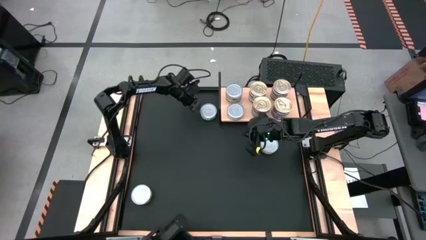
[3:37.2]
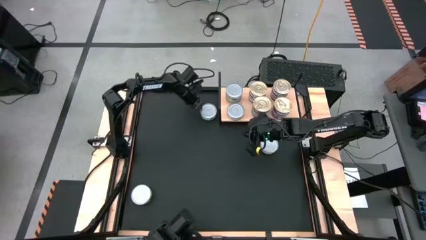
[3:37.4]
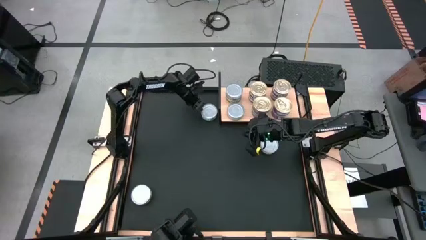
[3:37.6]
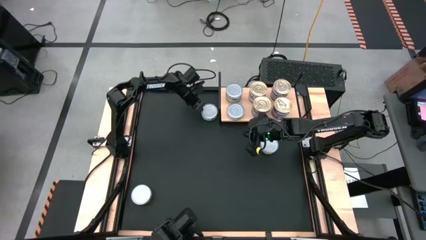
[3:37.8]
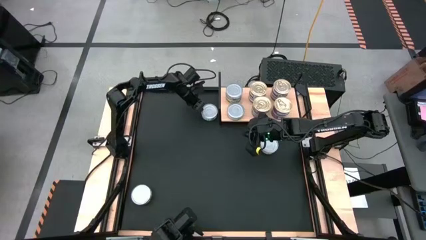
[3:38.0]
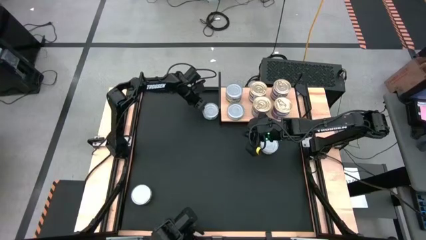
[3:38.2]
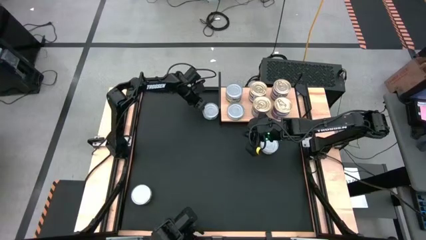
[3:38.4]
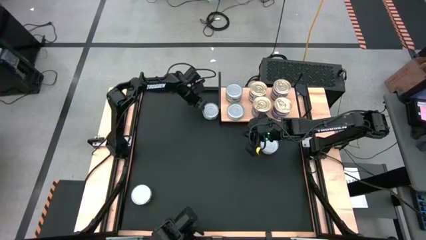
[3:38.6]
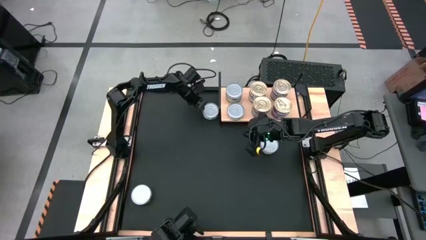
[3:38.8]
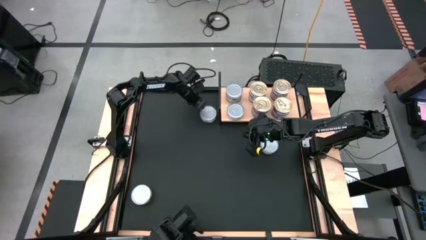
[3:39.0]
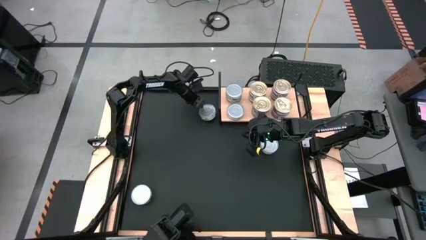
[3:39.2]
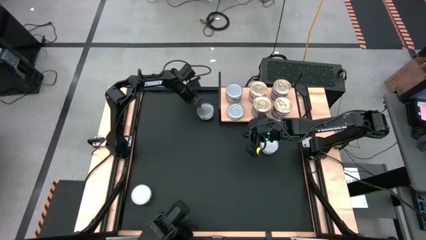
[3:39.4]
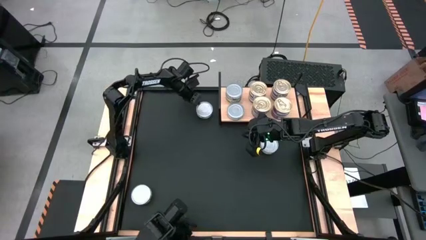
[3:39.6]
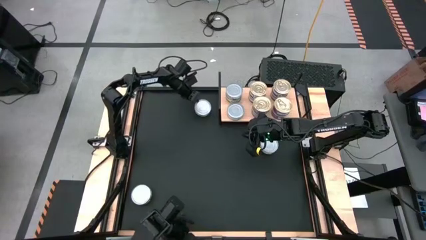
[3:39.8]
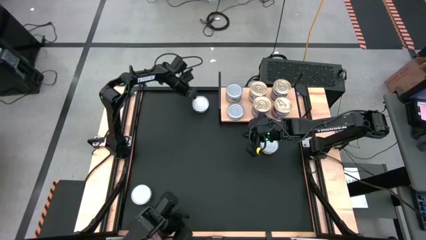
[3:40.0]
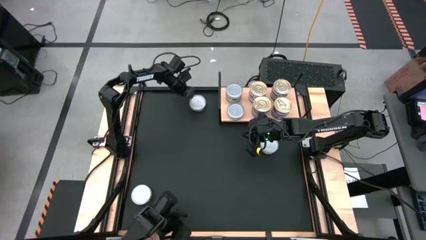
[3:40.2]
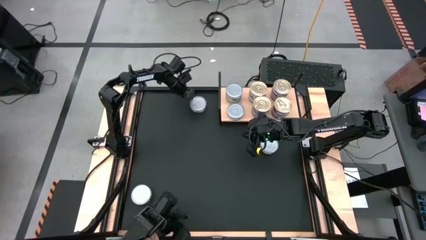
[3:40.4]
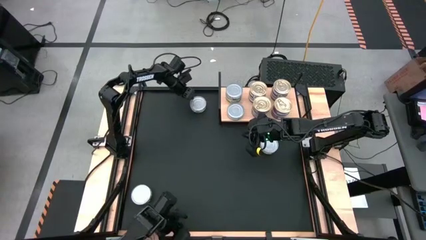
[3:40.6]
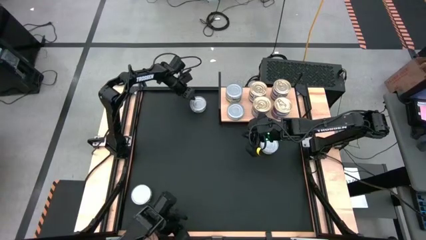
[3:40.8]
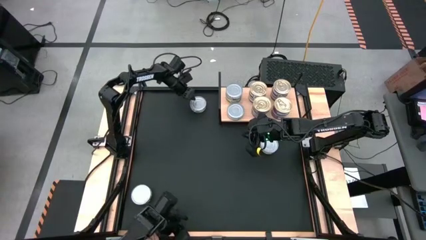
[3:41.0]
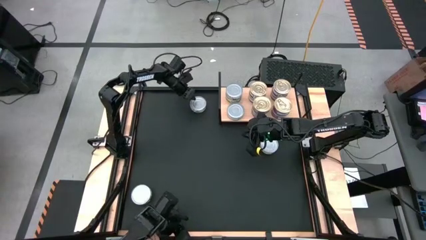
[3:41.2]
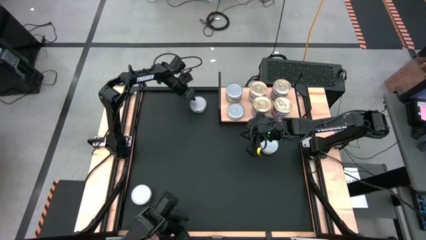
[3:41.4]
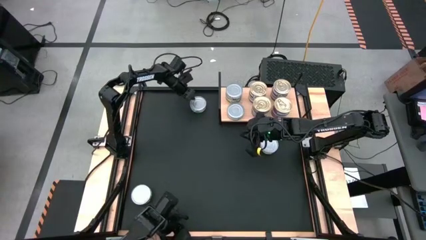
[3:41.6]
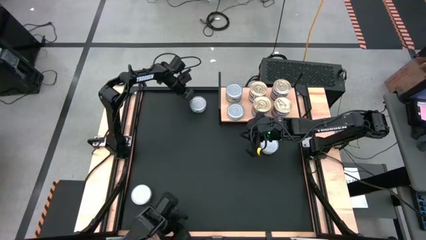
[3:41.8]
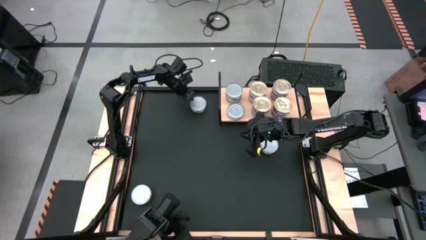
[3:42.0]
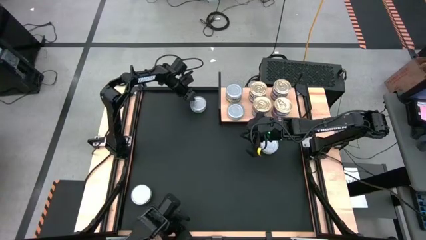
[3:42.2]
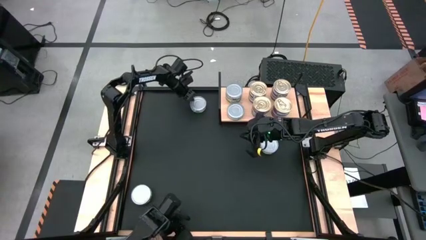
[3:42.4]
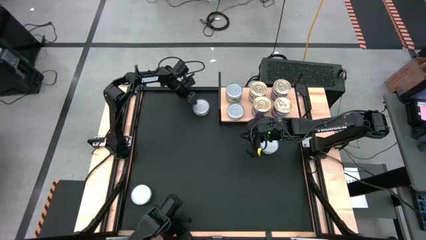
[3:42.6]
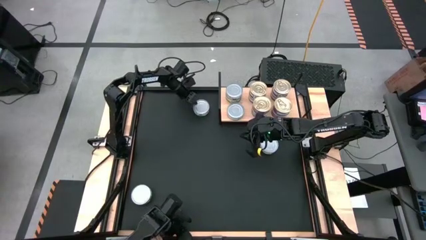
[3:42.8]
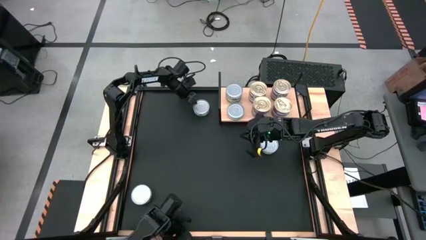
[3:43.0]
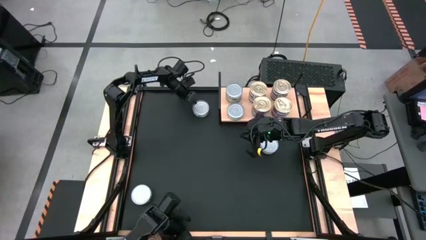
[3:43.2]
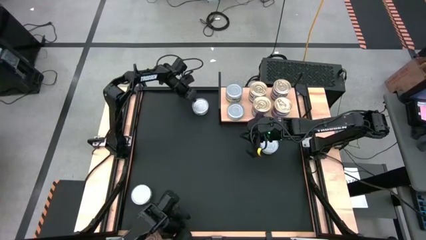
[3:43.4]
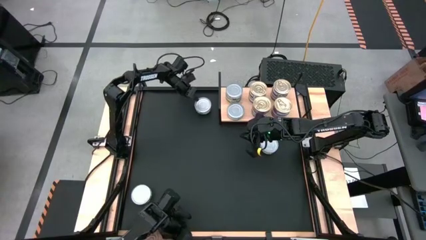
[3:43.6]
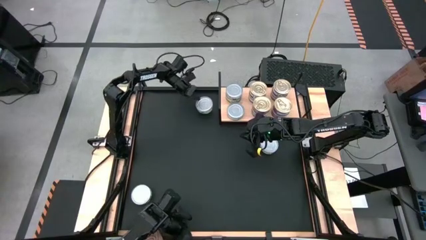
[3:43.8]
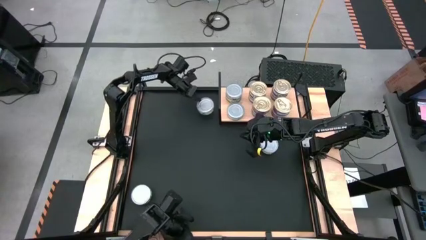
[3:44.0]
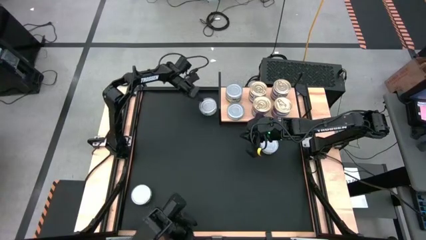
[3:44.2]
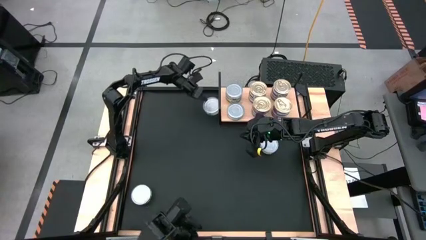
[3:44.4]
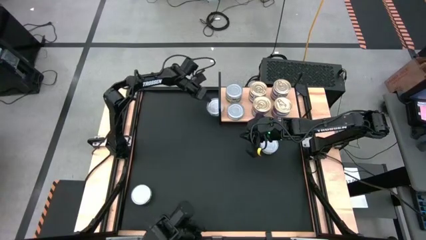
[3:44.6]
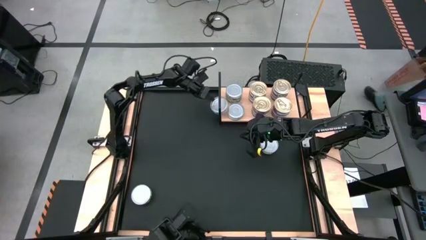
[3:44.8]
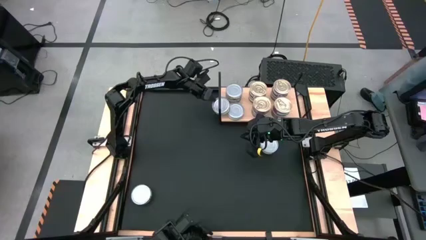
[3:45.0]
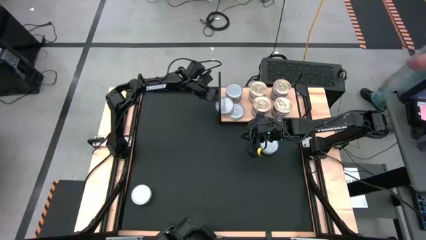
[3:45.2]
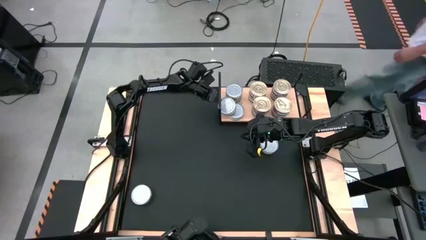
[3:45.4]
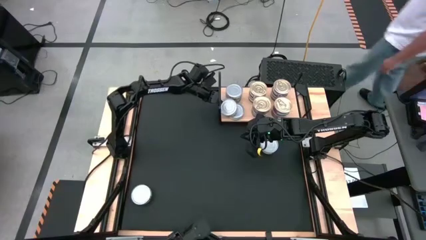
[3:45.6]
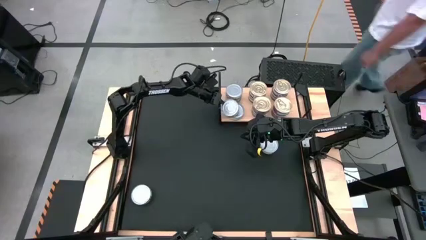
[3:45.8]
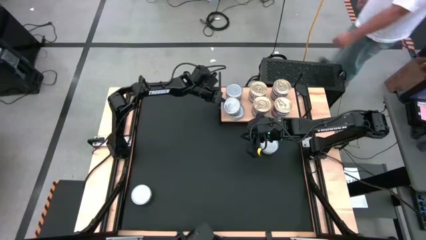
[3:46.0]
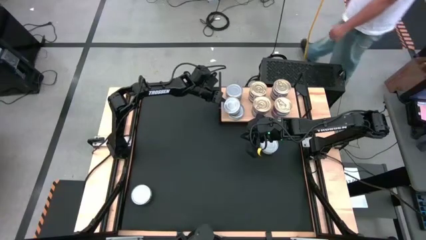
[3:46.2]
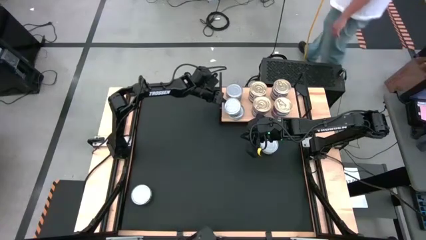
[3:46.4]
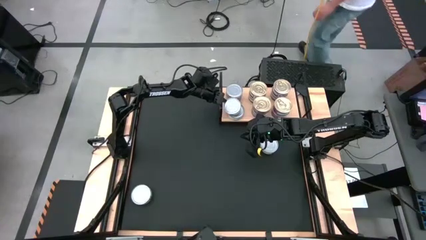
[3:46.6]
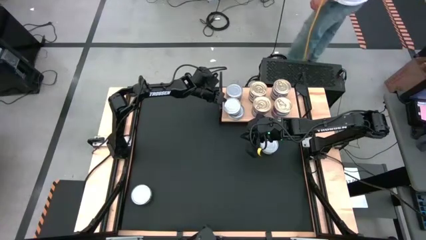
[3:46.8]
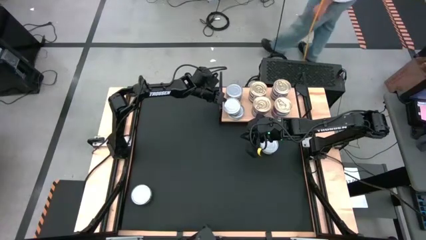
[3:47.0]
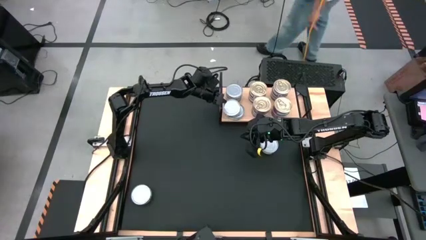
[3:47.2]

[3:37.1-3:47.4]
Task: Stack canned seafood by type on shelf
Stack the green tuna can on top of the other green tuna can on the shelf

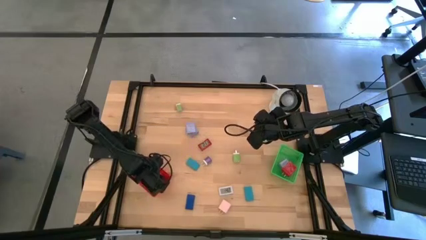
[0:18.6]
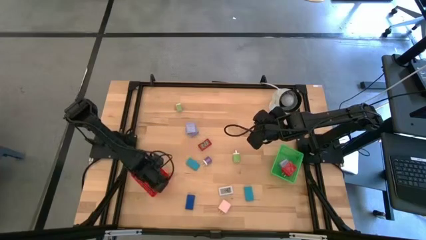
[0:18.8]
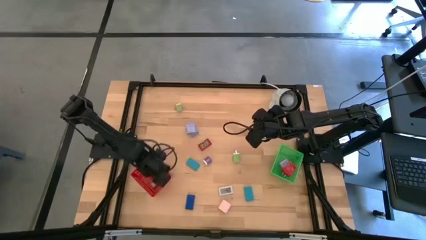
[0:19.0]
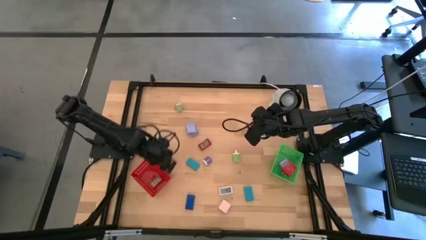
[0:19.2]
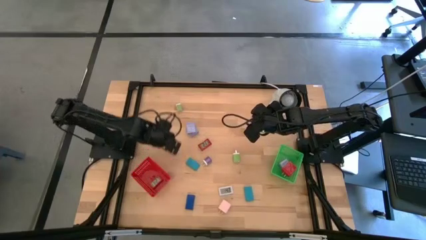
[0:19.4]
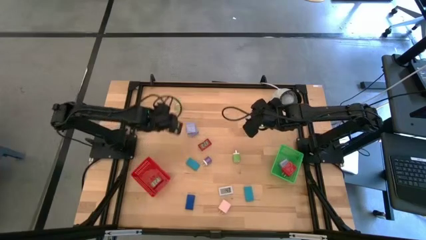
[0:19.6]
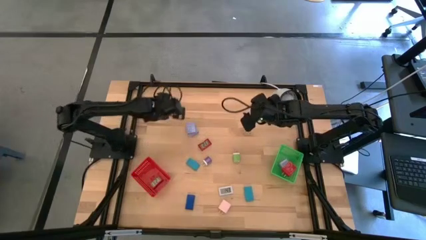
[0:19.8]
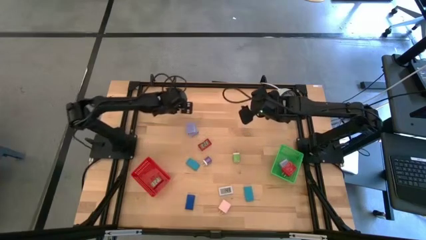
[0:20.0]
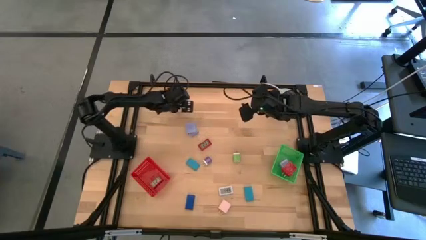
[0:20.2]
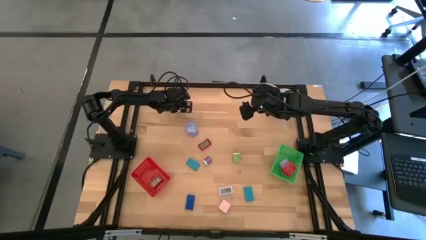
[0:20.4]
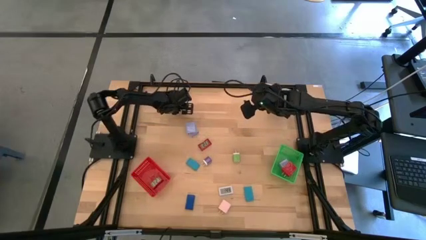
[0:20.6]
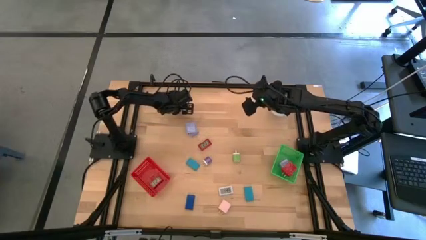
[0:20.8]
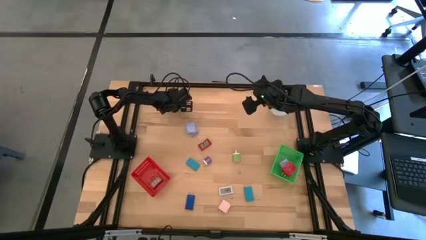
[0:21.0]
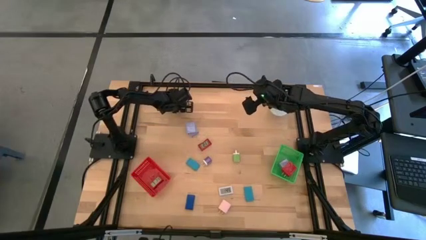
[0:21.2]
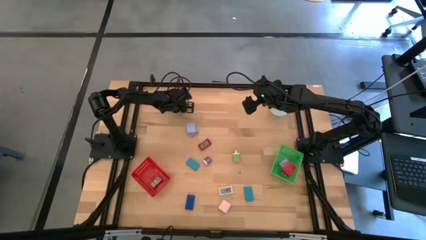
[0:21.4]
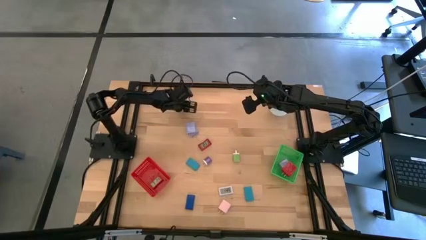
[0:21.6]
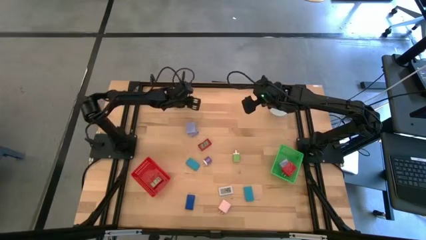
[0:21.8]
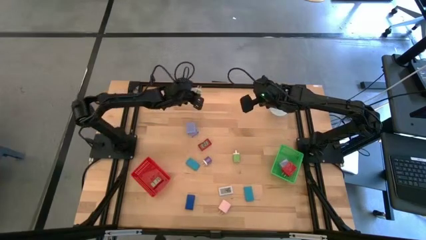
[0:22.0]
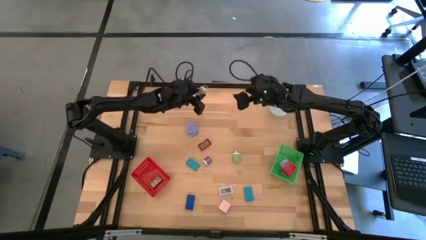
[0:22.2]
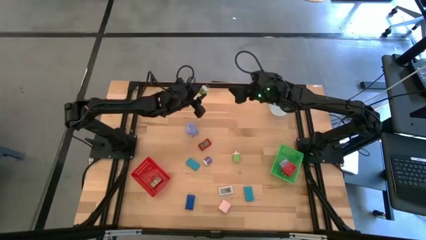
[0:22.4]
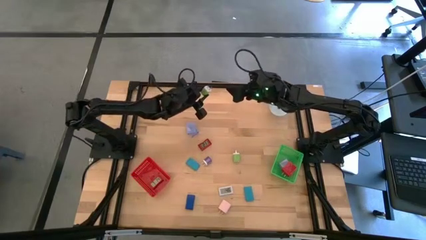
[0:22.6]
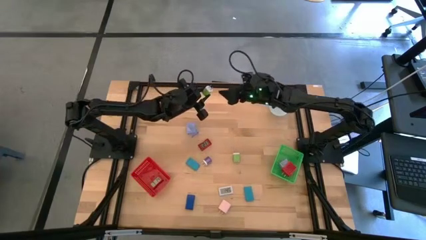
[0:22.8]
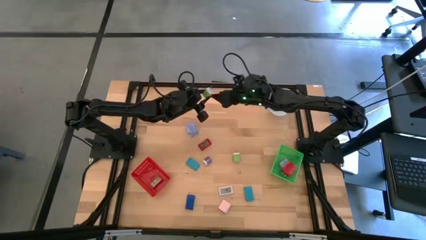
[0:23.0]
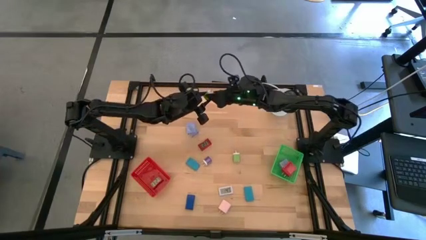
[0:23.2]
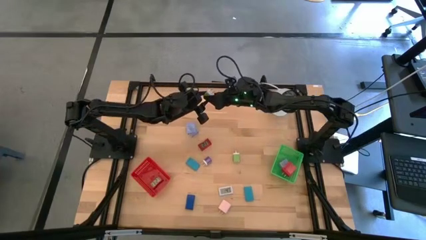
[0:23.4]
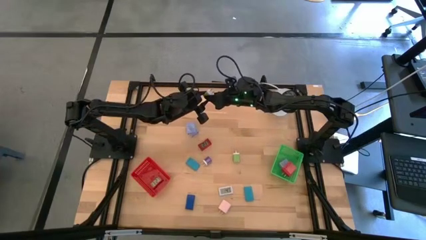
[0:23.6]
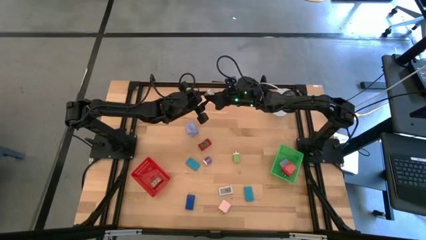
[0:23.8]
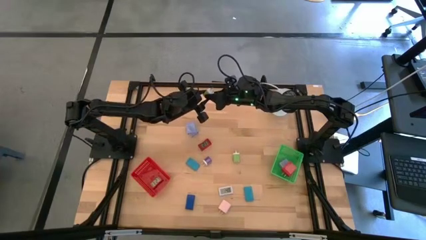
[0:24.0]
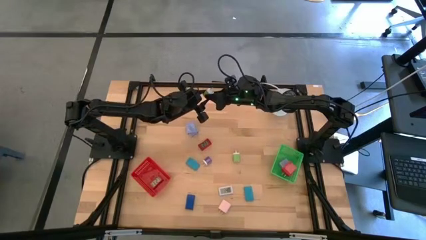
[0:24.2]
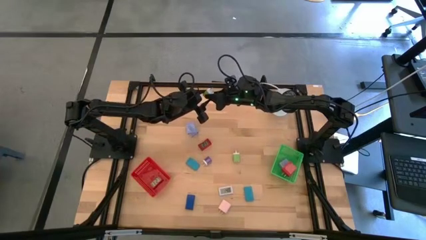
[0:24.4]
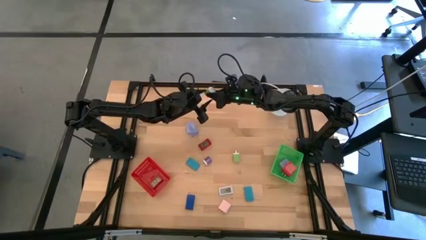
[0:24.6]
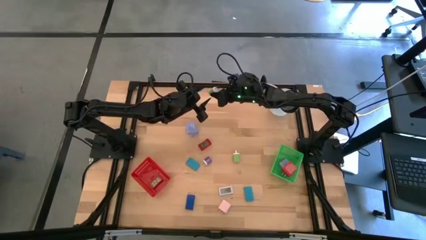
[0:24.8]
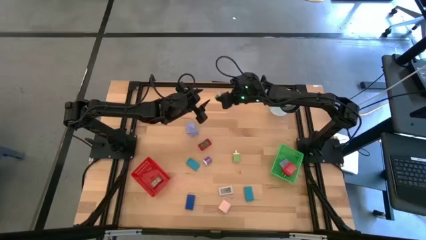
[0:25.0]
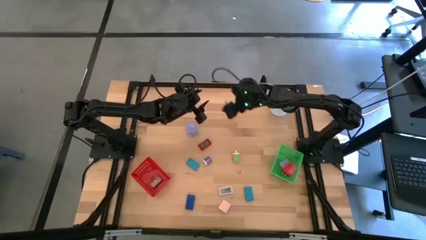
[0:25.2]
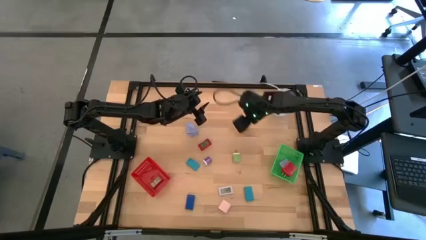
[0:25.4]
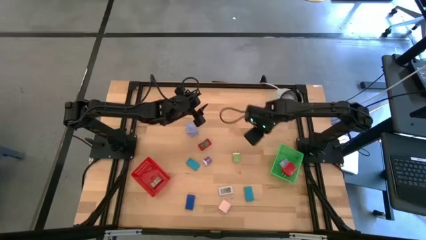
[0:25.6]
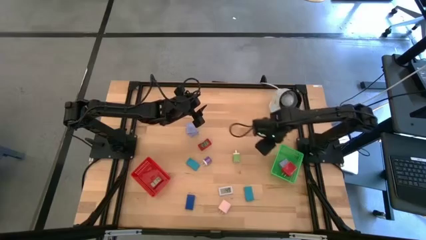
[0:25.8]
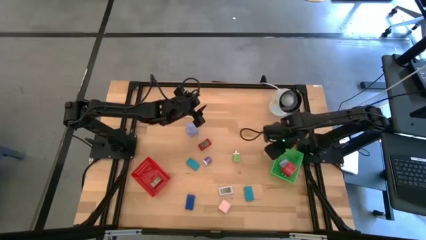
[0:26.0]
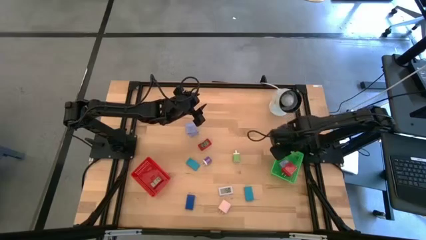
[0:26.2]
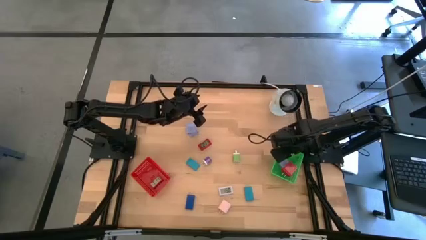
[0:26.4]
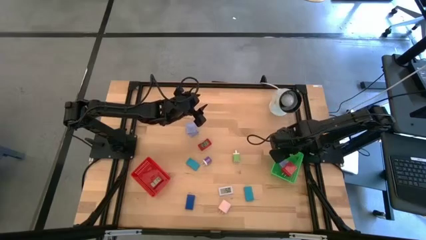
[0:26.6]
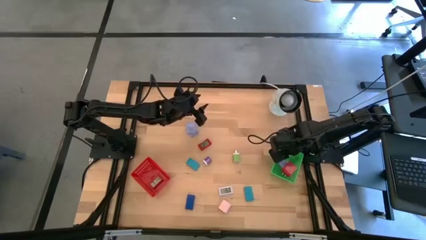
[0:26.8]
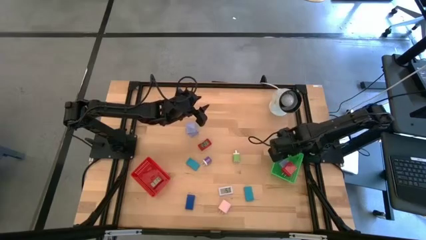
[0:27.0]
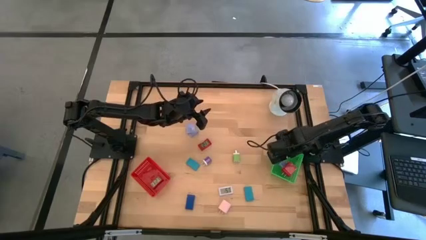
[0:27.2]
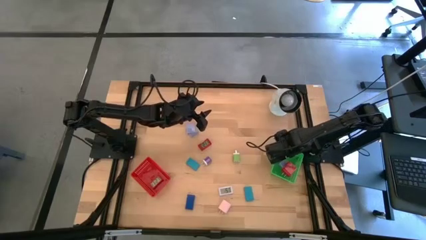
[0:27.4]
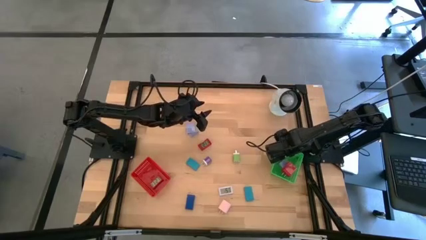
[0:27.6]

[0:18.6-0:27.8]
Task: Pick & Place Office items
Put the top green power adapter into the green bin
